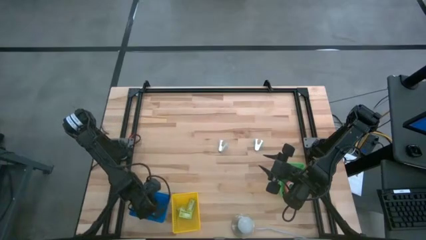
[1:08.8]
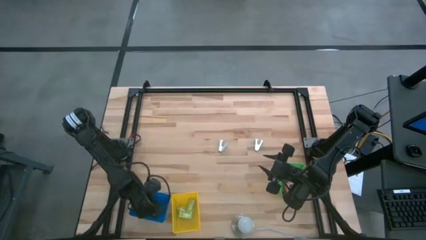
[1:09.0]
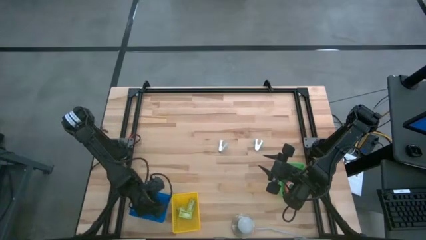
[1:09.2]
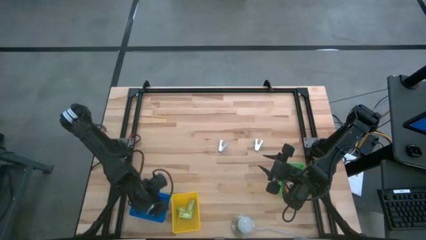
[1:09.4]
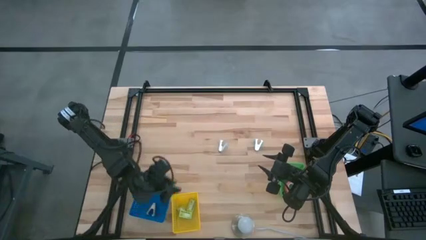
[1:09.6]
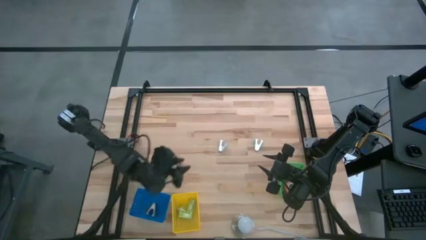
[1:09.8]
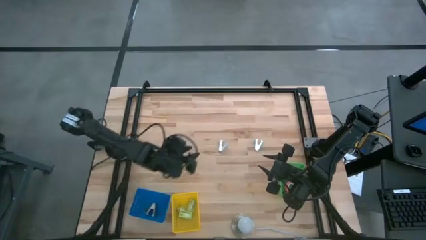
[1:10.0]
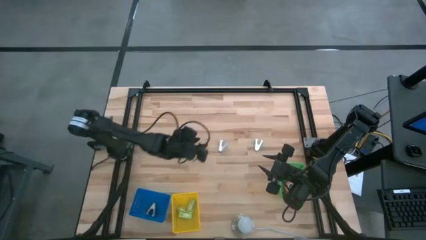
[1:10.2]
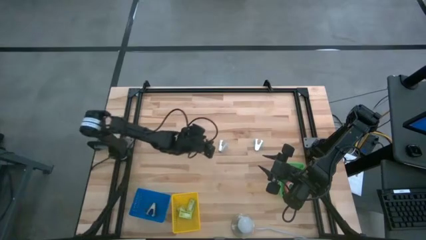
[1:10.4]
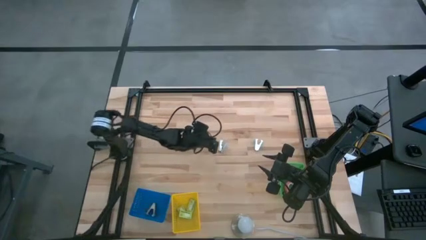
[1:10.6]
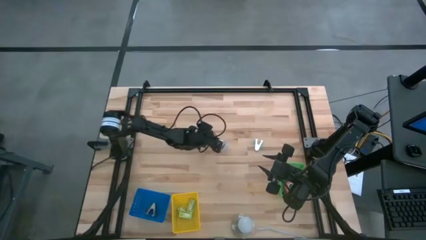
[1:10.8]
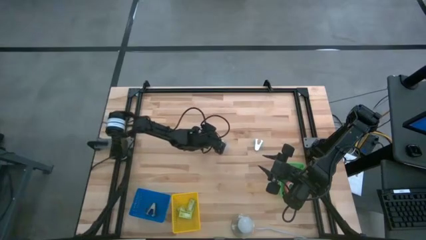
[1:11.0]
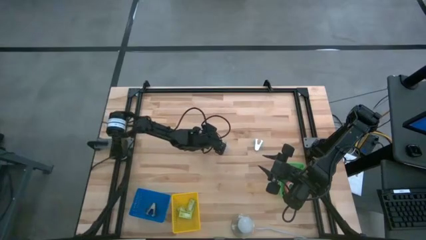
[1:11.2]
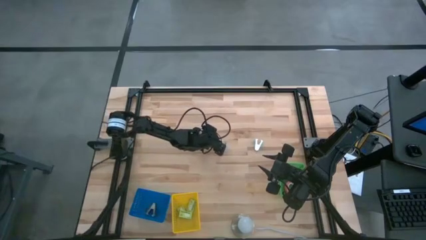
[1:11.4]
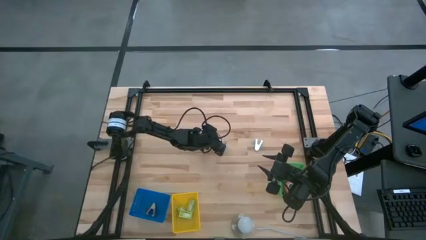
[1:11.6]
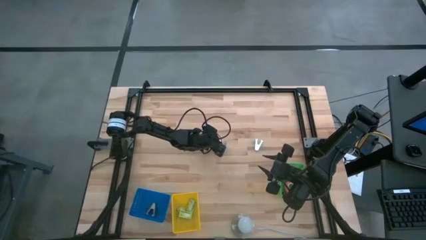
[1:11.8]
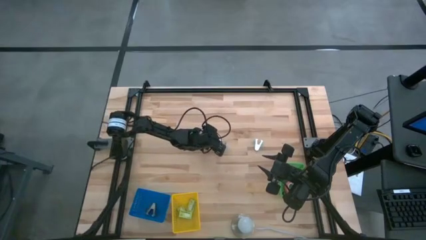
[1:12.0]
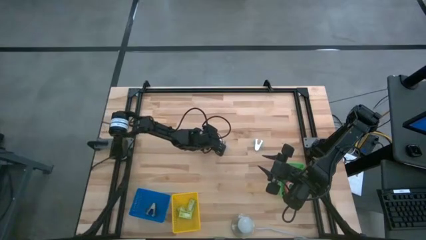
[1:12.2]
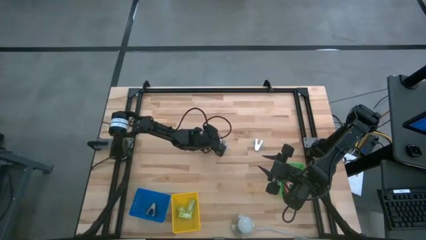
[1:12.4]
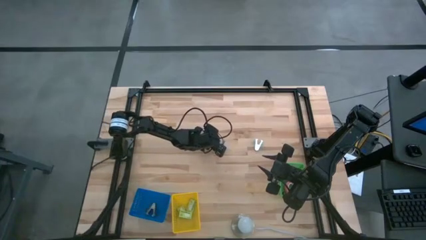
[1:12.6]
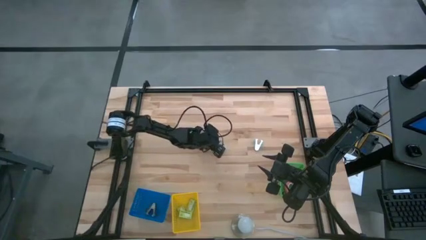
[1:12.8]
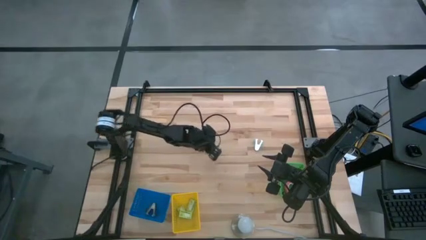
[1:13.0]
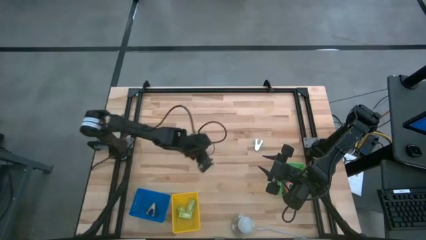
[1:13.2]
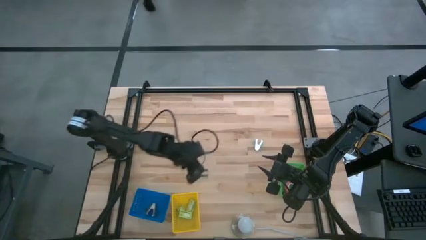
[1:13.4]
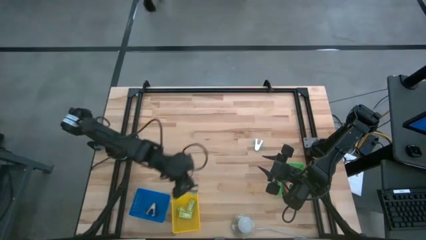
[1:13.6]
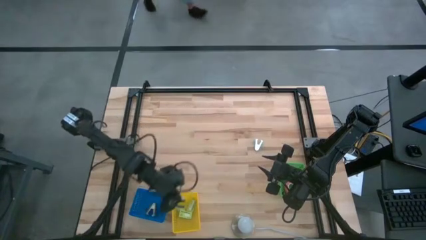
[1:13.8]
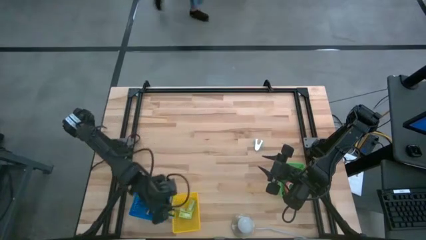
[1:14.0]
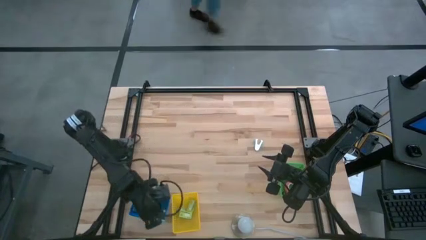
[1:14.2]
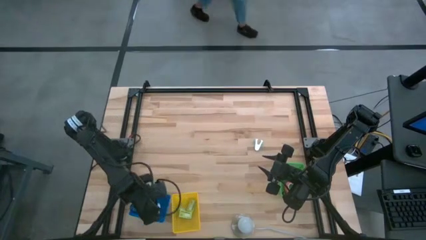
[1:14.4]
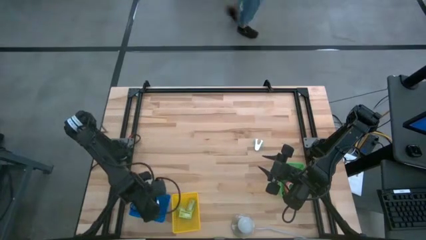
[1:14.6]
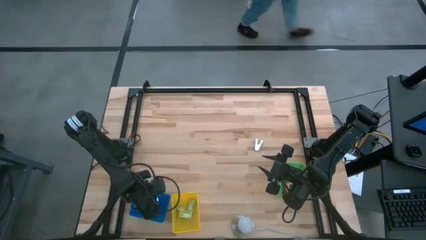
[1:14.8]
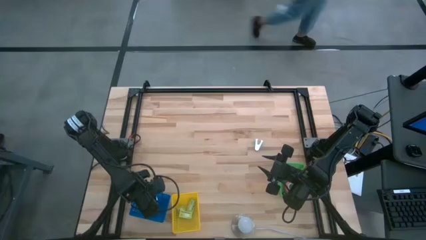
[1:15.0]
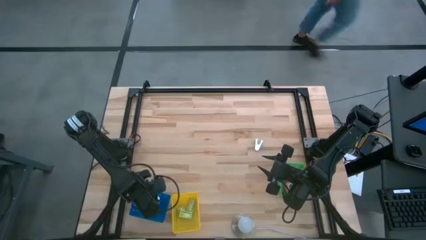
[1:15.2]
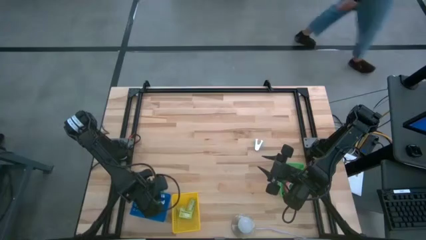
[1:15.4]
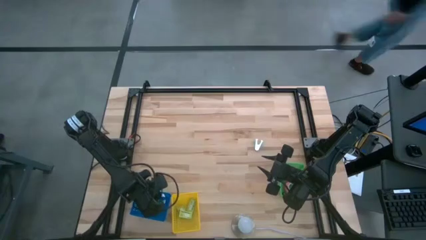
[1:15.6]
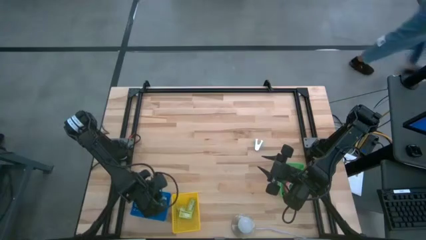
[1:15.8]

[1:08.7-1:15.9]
Task: Pick and place Stapler, Stapler remover, tape
Put the left blue staple remover into the blue basket

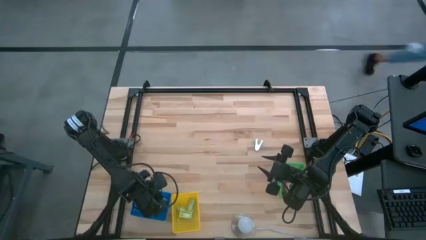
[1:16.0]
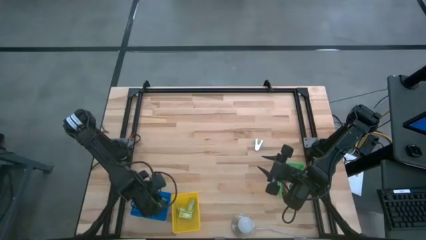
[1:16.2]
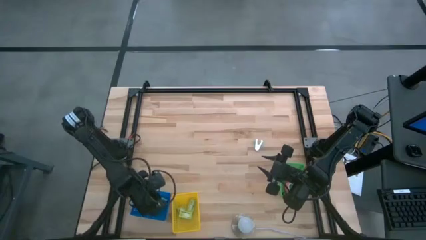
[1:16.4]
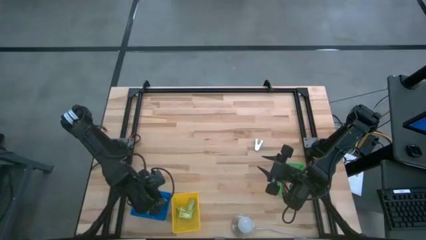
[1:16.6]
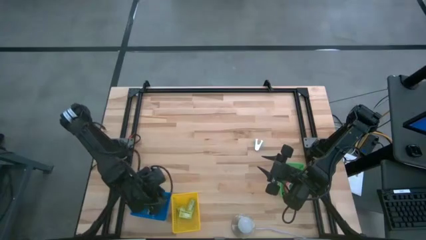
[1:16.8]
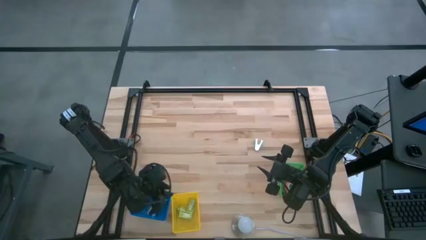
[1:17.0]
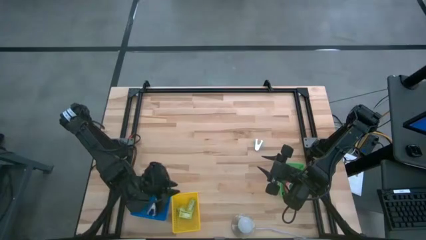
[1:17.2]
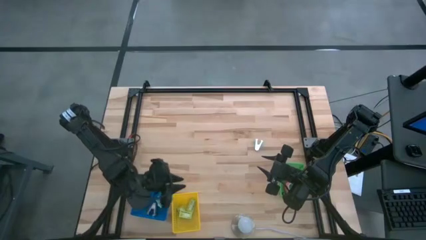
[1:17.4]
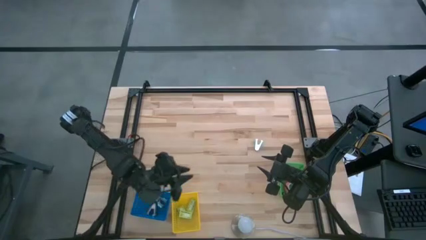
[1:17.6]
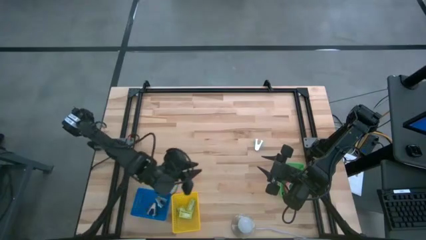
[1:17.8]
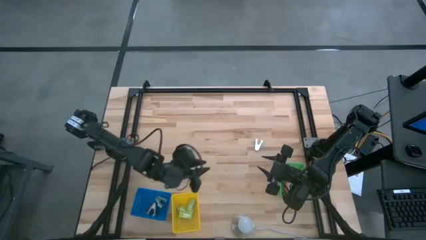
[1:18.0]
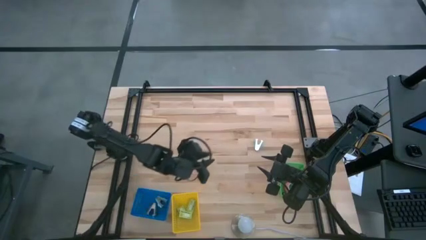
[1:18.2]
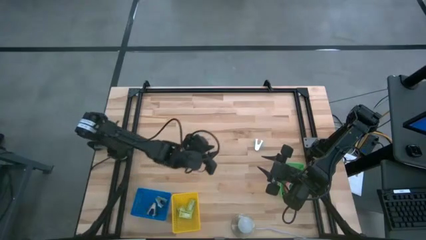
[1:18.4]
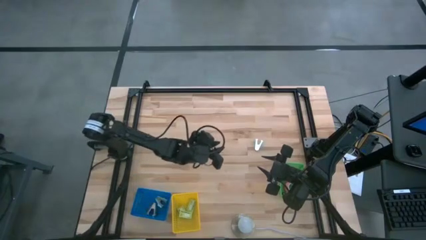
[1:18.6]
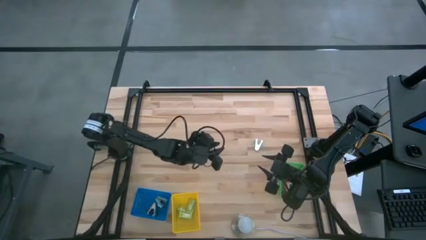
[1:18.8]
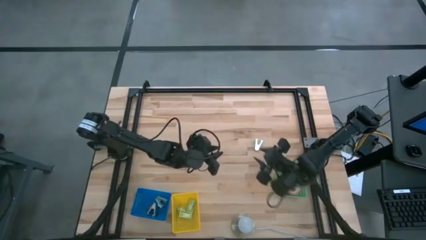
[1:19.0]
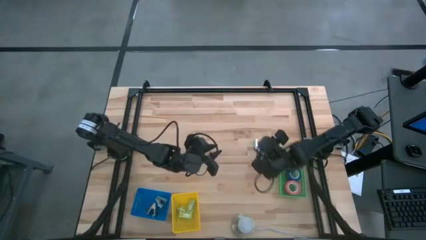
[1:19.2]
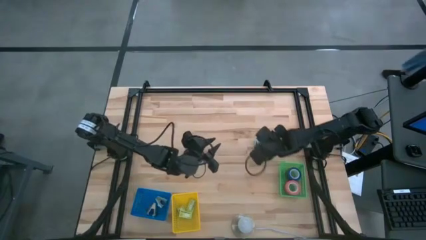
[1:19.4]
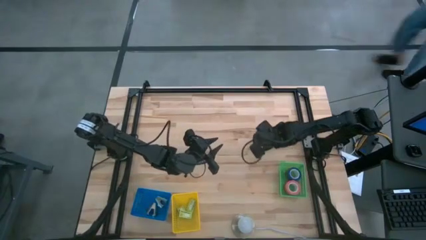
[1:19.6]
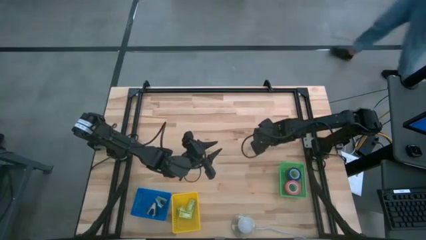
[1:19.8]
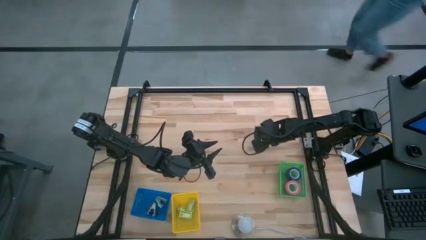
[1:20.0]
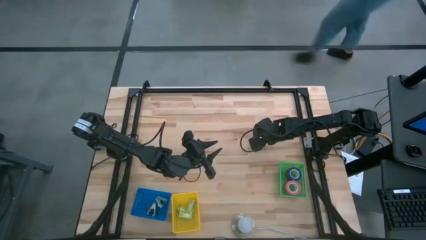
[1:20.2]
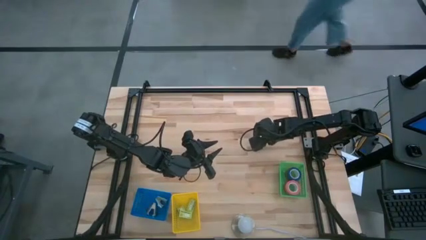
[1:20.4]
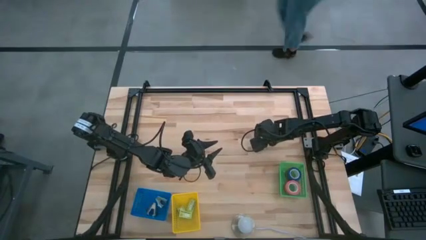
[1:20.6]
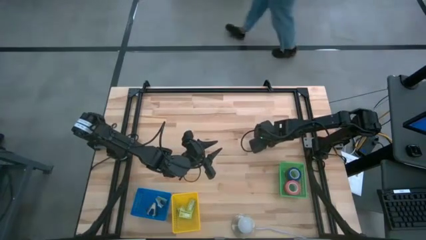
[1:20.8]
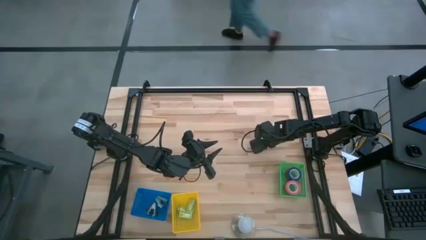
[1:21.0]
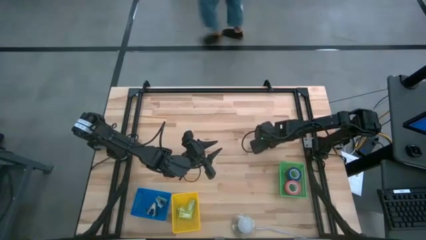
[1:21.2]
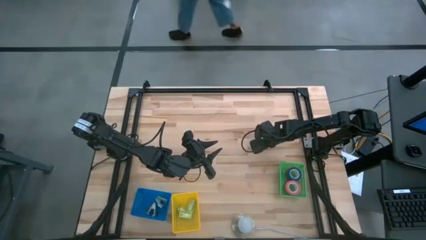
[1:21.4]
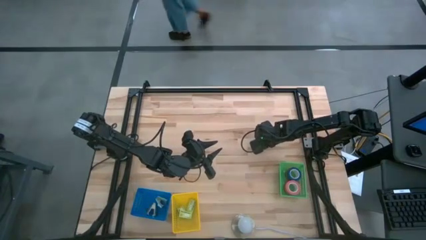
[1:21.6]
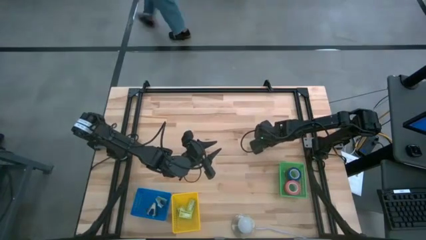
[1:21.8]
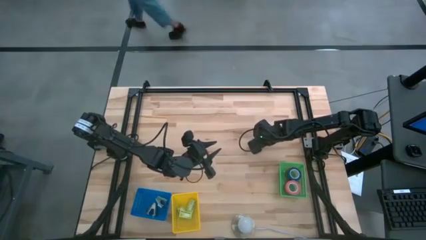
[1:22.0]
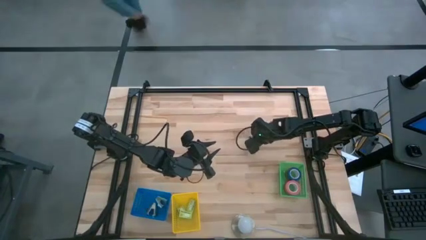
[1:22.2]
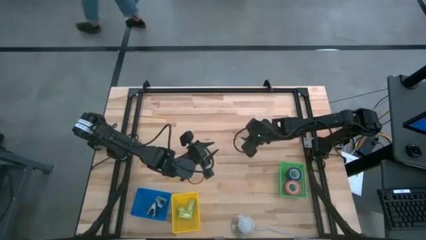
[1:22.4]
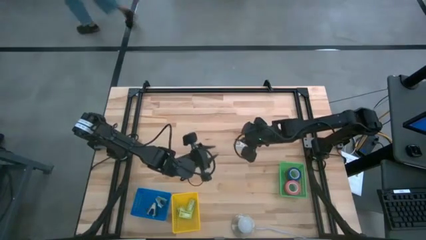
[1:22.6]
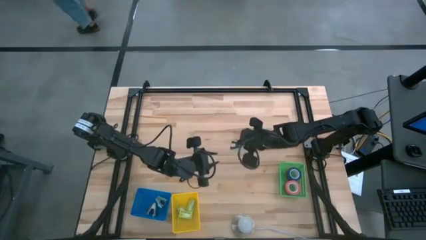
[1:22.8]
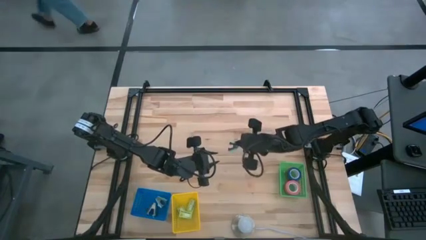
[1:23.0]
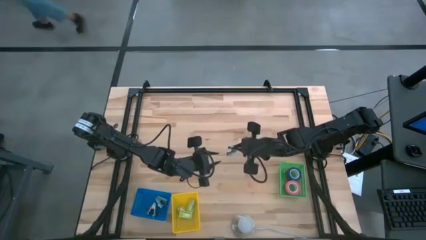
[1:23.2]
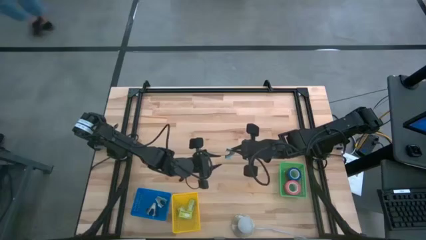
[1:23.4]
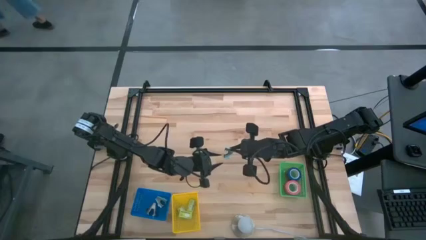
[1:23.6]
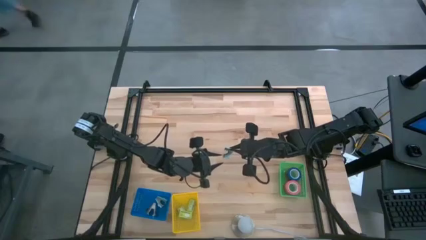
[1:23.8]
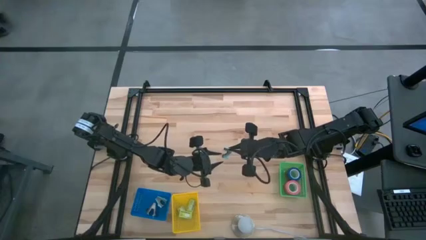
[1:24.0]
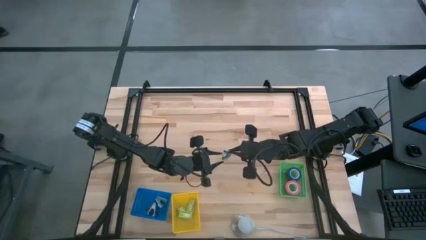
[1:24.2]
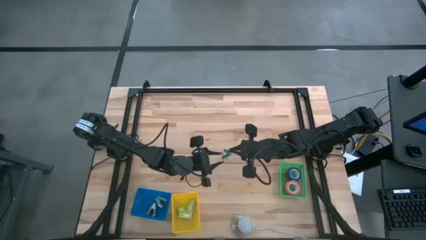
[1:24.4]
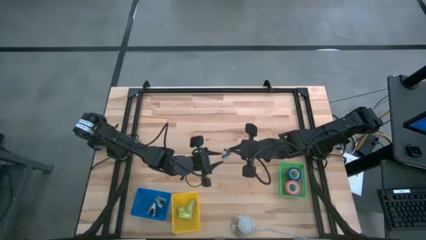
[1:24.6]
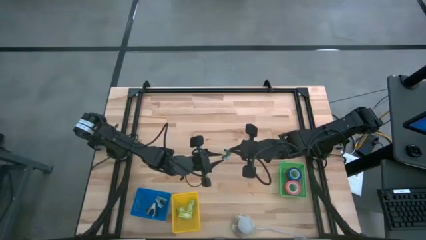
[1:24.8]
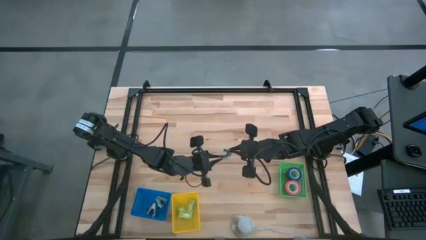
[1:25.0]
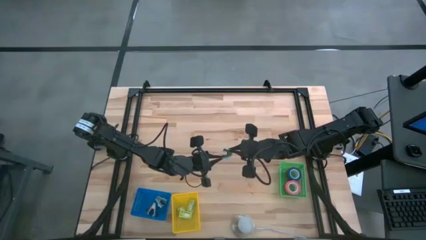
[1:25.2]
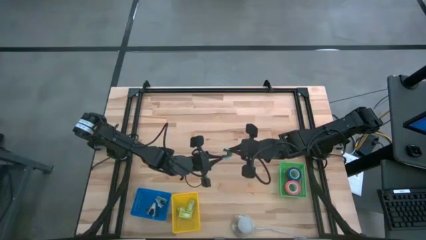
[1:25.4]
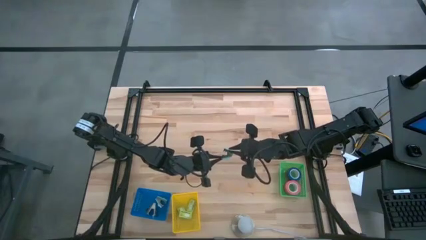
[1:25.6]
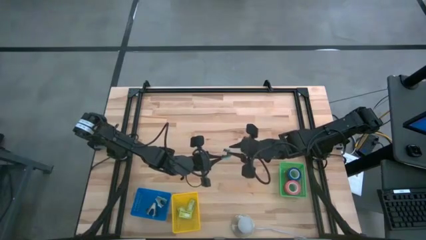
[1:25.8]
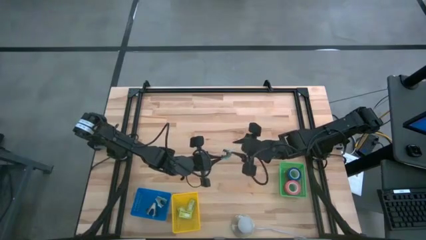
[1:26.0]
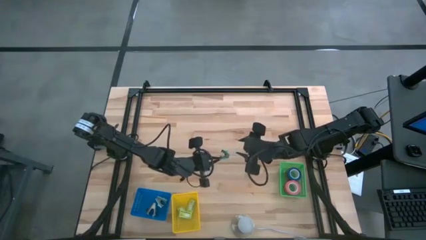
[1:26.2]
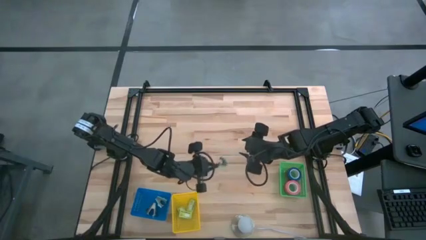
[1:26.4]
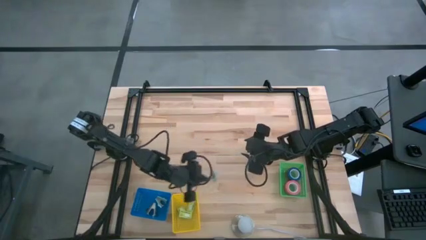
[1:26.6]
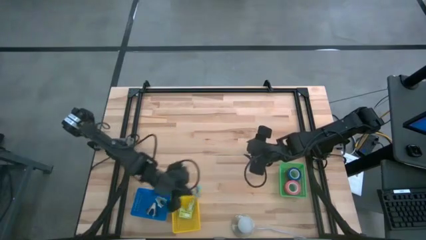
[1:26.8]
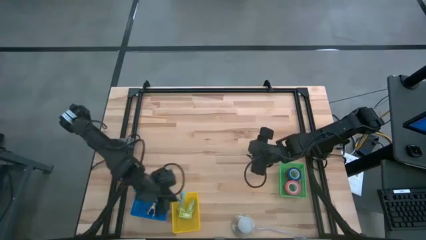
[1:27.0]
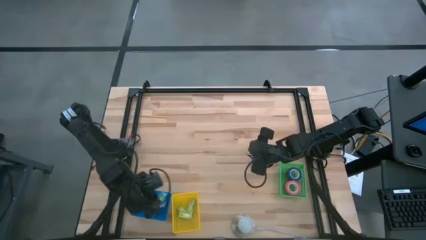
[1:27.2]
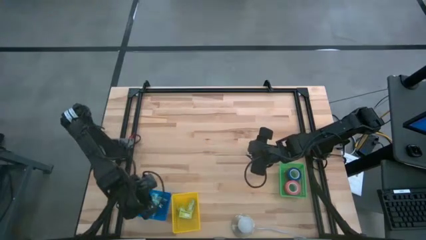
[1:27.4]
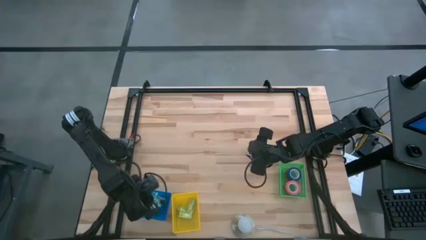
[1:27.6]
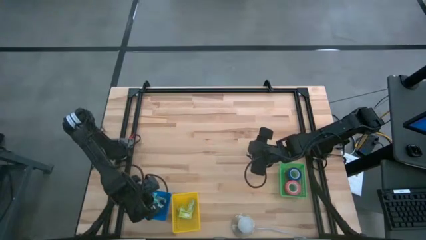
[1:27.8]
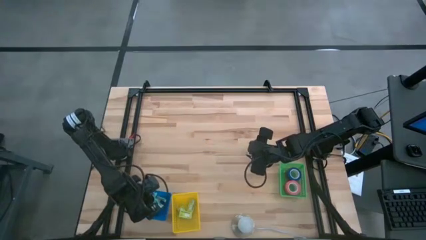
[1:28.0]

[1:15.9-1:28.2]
Put the blue staple remover into the blue basket
